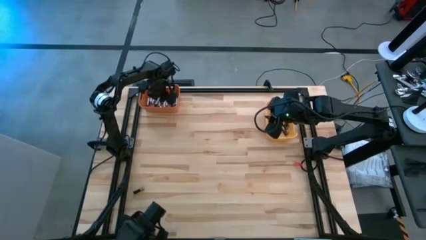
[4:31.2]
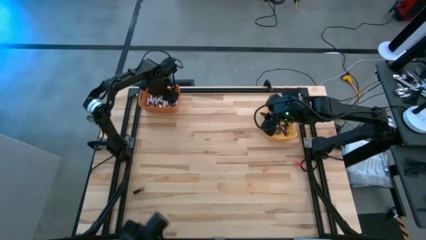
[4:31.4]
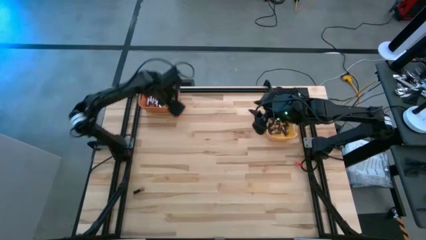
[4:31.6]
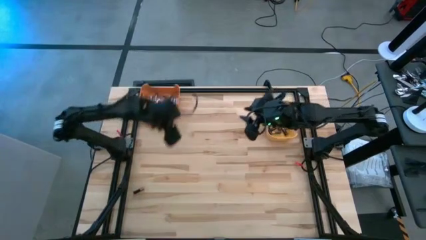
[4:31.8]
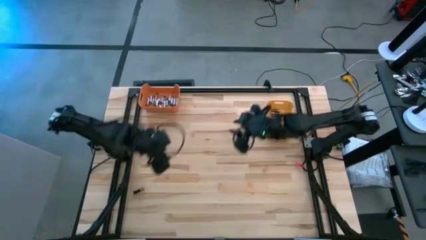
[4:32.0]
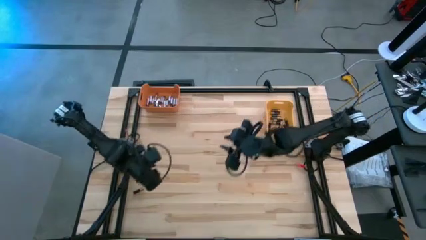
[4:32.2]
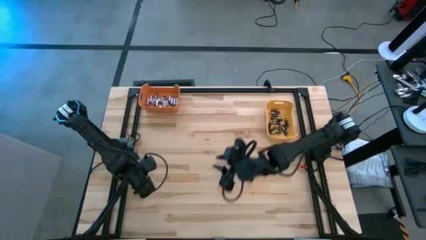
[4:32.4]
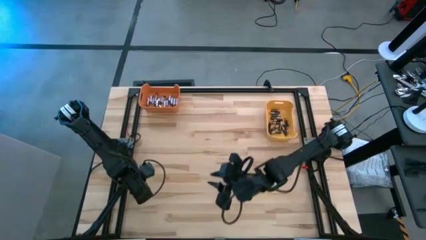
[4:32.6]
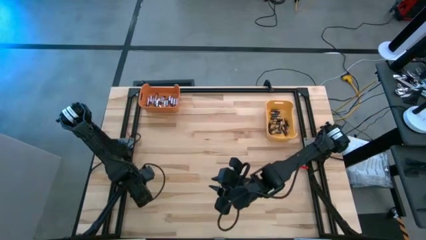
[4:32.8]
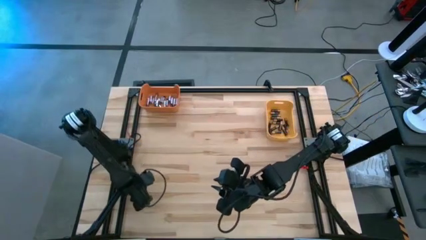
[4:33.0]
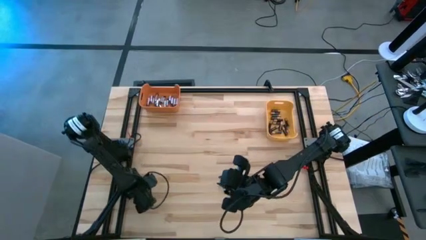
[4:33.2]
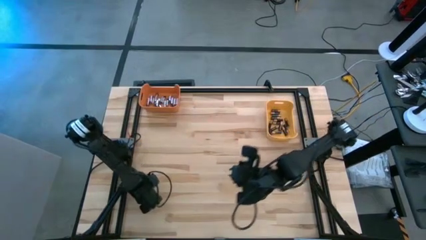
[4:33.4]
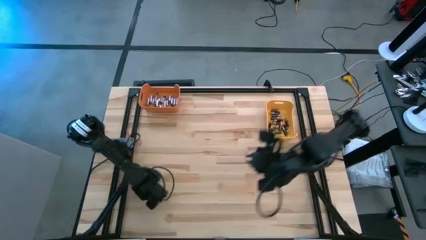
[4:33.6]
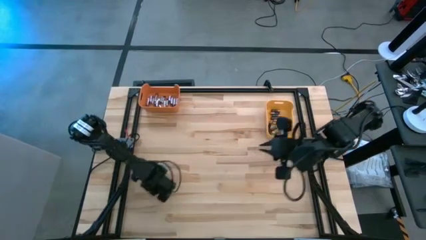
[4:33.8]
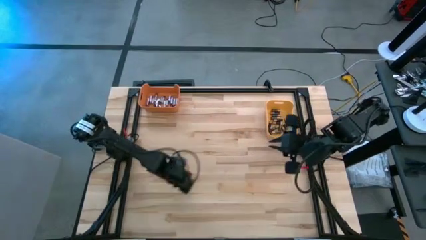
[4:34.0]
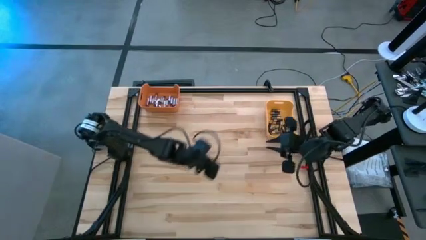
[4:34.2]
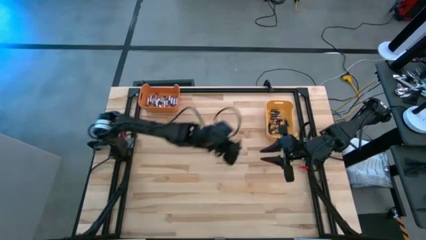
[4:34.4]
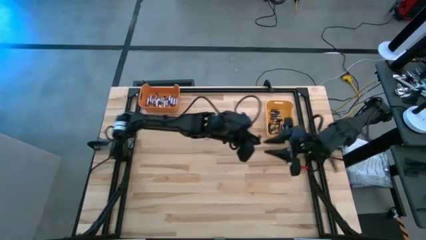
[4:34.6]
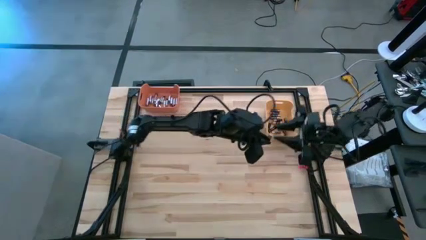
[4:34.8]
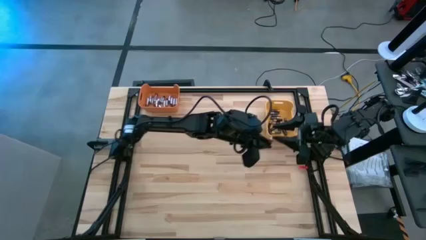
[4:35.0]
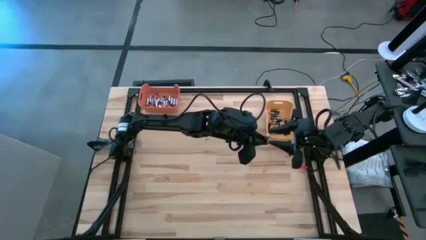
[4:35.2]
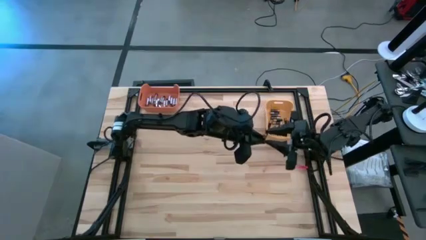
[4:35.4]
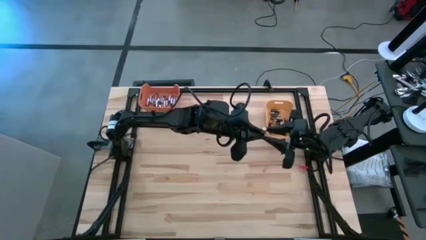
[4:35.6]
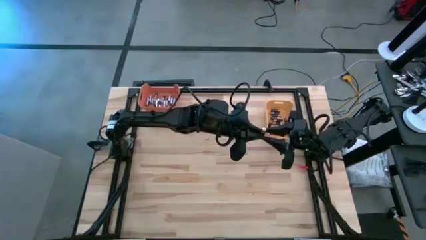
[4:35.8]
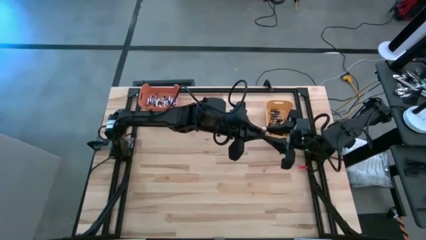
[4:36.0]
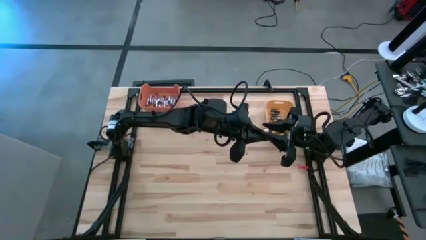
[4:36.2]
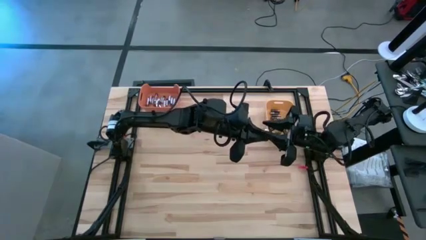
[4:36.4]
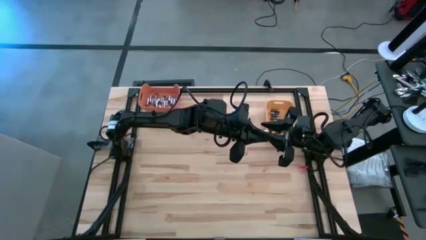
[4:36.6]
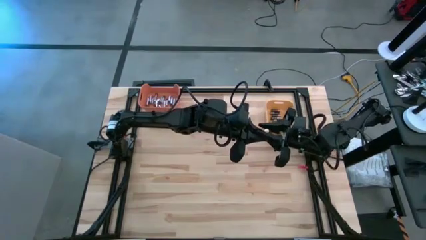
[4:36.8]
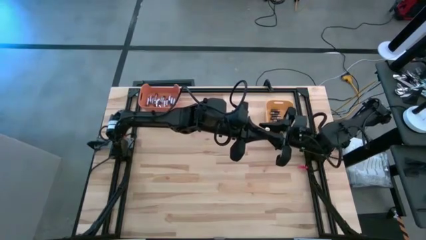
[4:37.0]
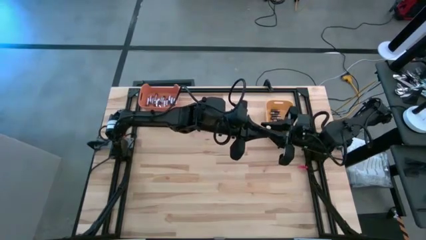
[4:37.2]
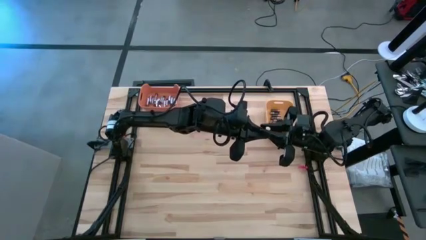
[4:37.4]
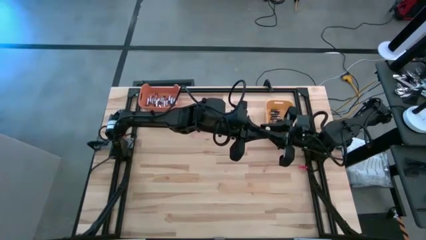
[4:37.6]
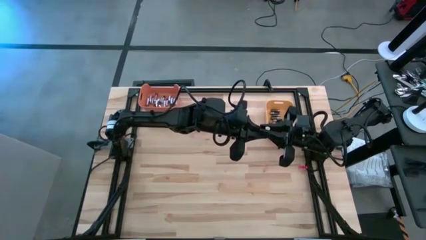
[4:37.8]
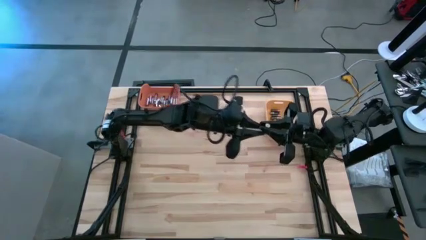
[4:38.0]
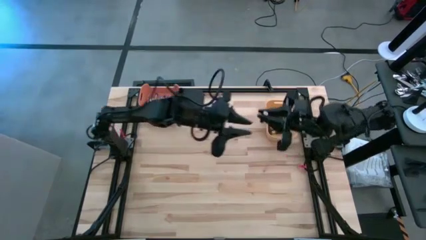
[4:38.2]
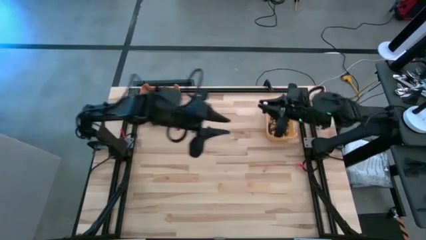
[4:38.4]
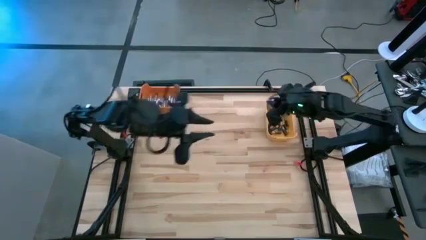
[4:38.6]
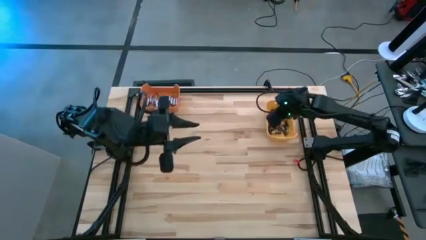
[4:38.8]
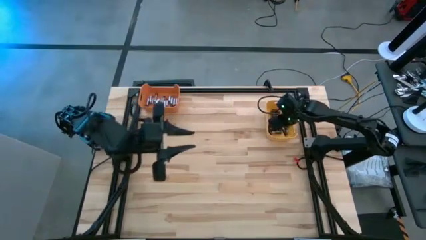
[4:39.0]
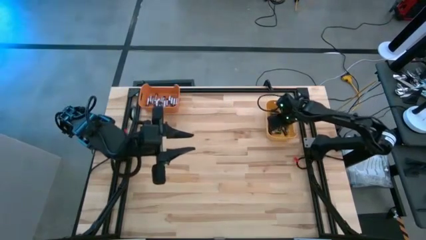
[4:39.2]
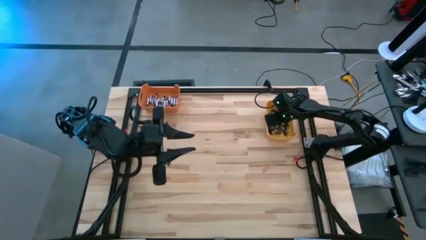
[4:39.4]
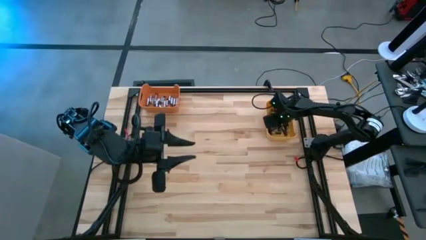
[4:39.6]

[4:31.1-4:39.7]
Task: Sort batteries
Put the black battery into the yellow bin

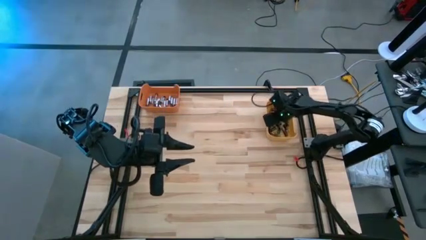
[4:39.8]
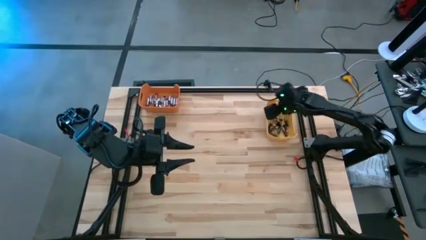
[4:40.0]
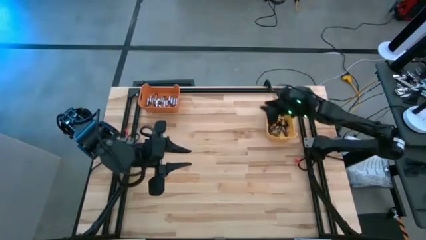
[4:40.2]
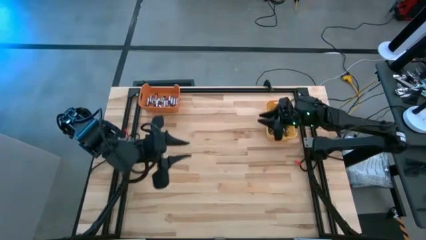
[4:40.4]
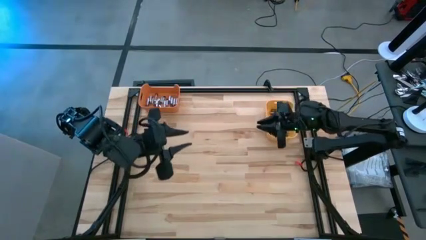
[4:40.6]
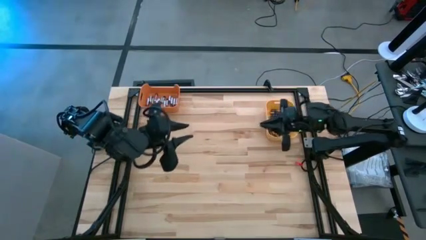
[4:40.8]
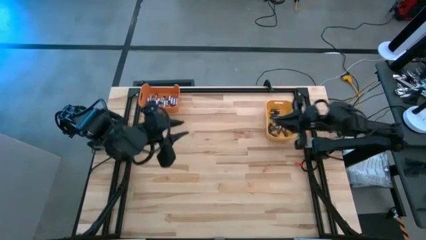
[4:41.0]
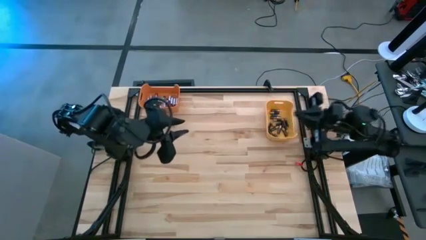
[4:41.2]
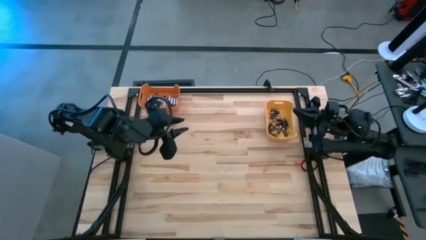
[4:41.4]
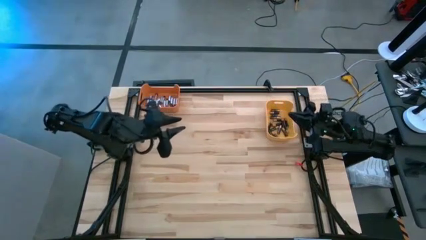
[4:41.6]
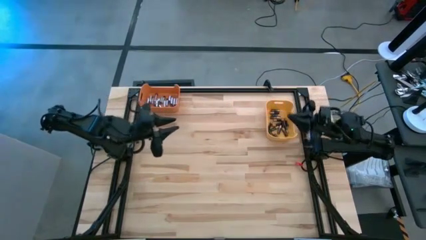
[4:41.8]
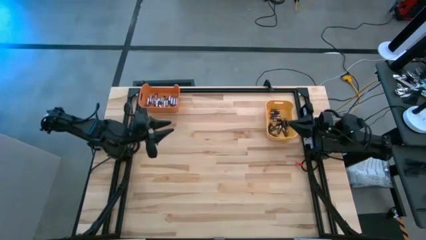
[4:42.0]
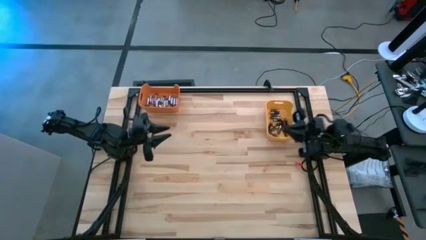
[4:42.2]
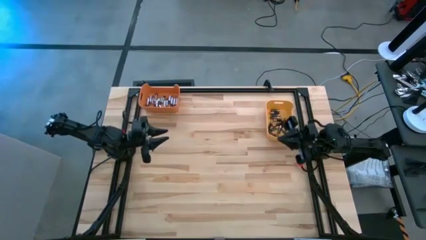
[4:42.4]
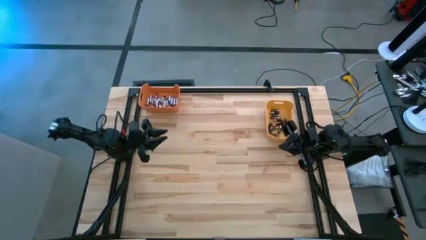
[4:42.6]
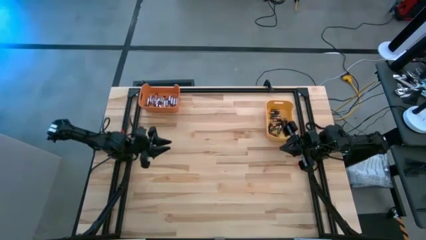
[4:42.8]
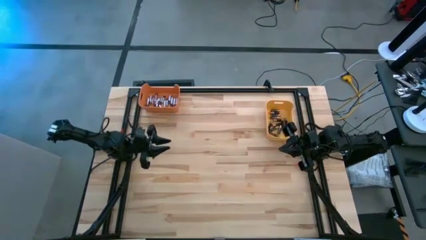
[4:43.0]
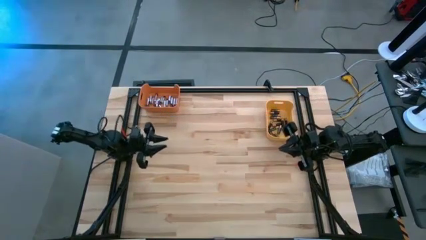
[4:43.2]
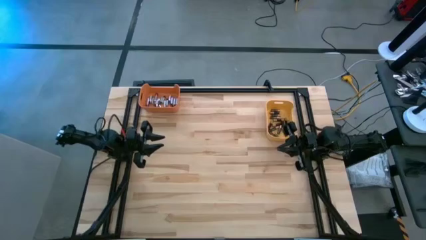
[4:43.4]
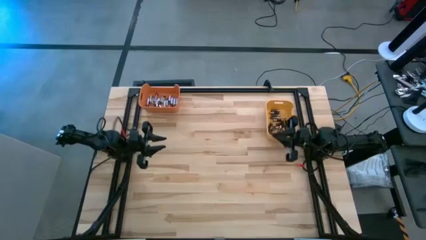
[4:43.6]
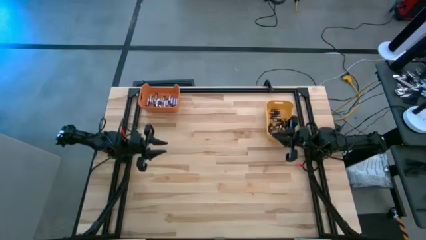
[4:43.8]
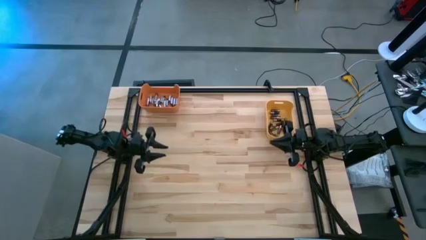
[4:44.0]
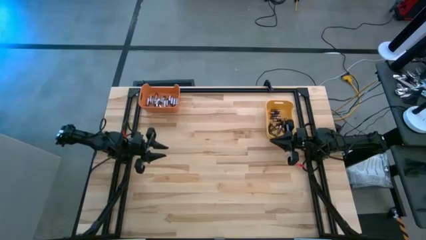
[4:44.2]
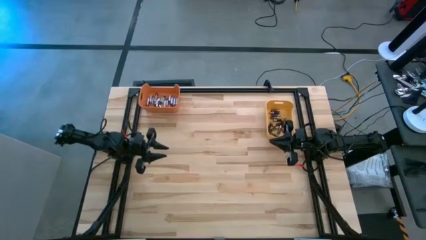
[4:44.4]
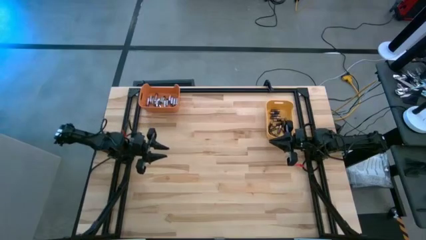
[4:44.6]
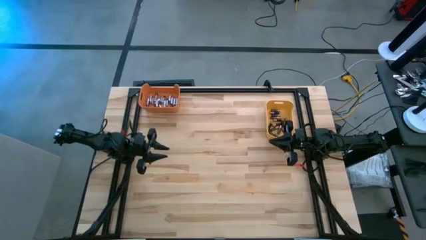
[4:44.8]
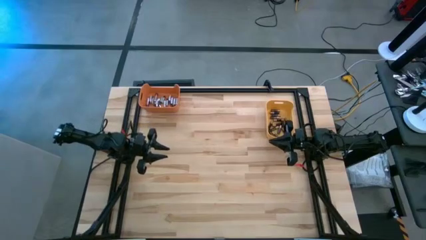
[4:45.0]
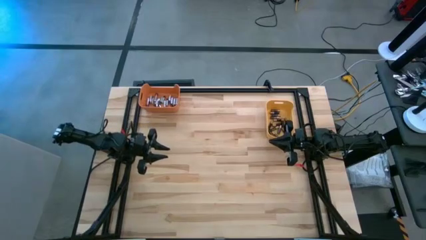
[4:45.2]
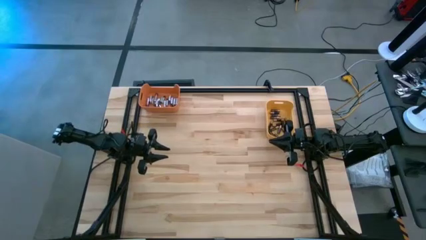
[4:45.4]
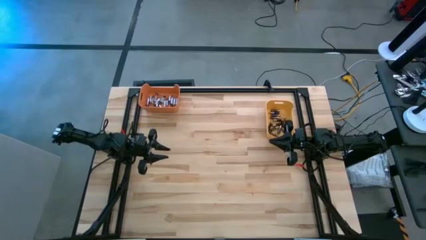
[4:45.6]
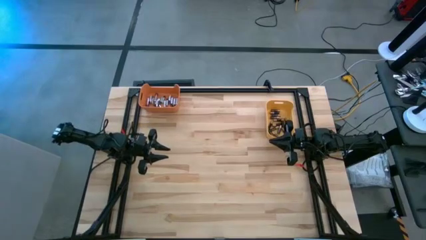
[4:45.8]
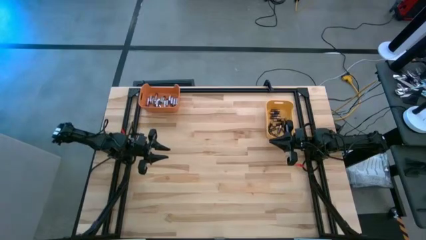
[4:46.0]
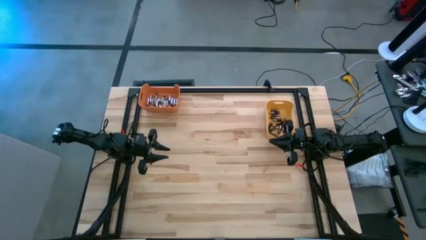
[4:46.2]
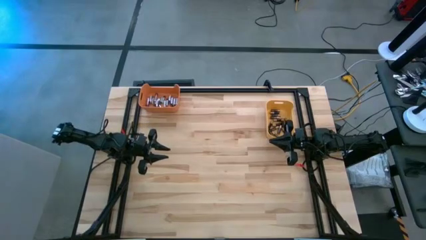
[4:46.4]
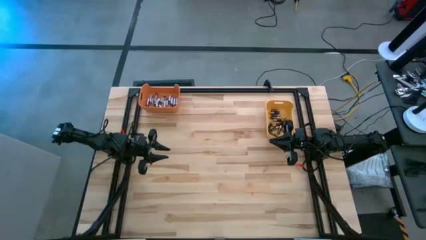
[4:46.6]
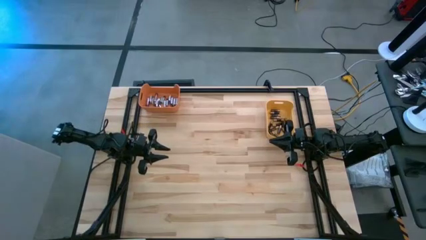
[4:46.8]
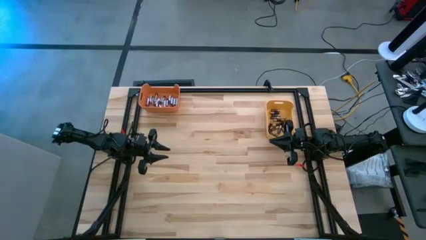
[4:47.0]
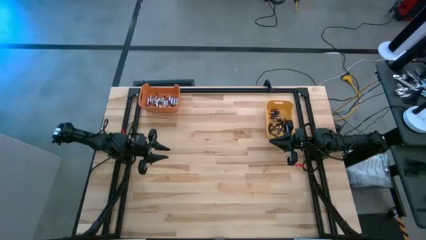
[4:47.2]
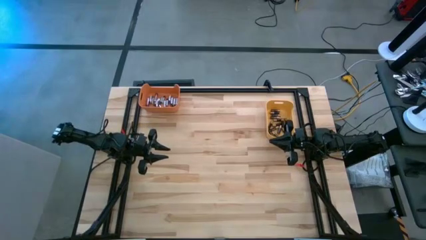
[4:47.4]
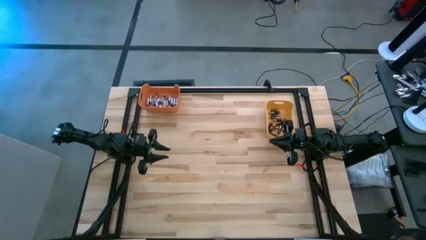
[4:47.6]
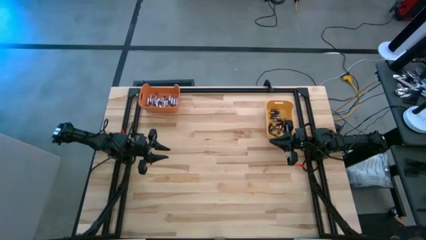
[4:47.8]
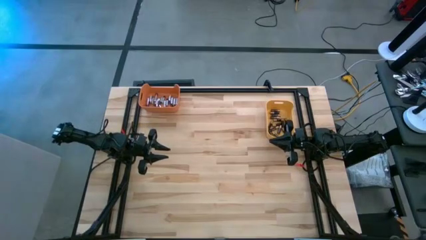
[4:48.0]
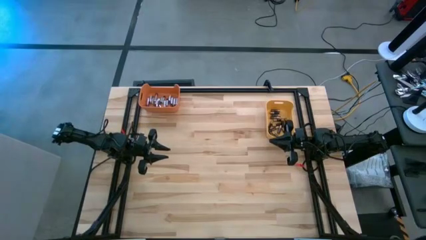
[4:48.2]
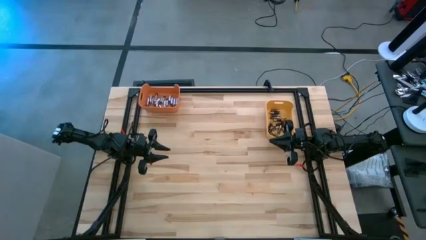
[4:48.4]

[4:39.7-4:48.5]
Return to Home Position
